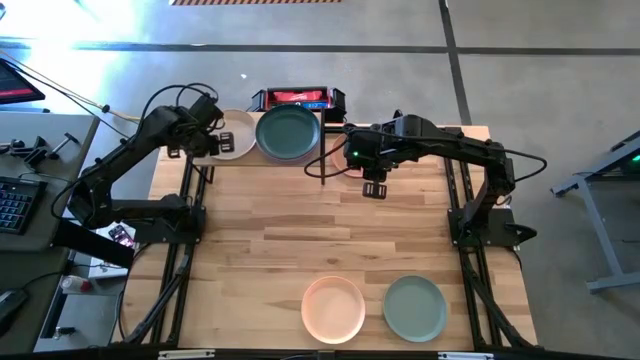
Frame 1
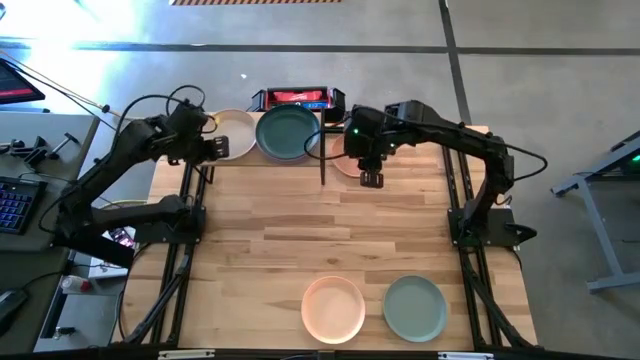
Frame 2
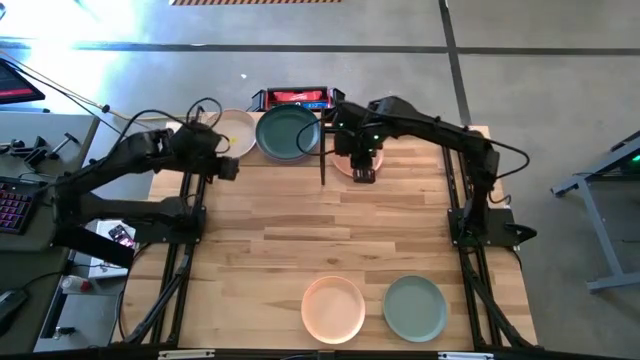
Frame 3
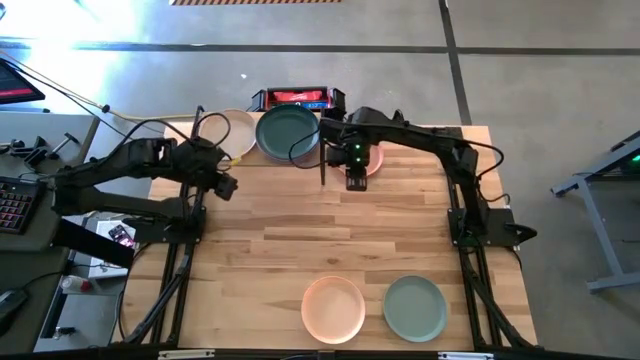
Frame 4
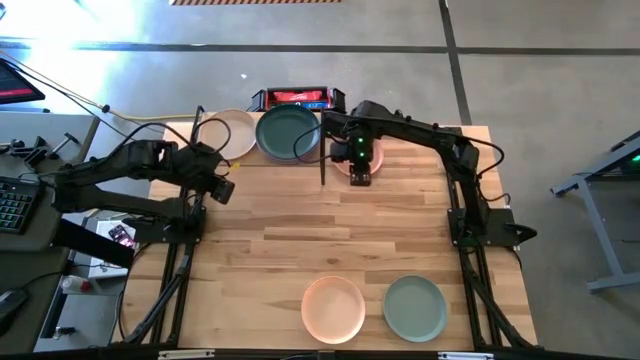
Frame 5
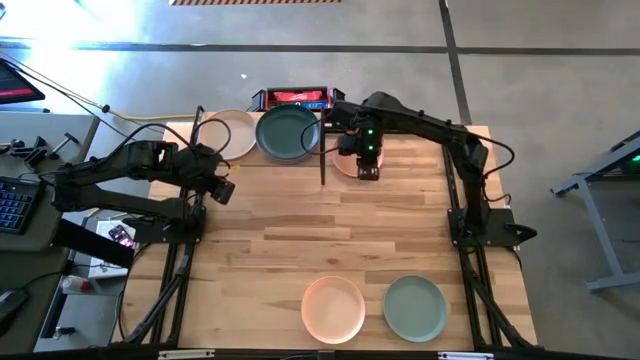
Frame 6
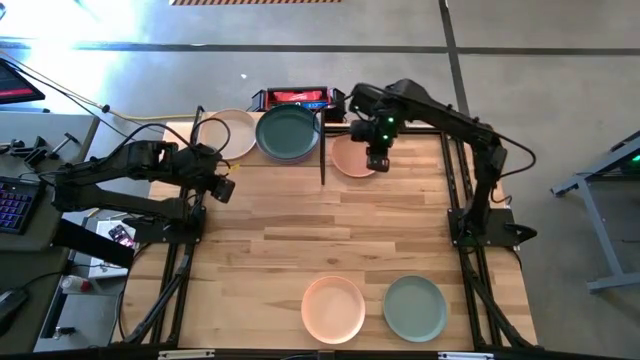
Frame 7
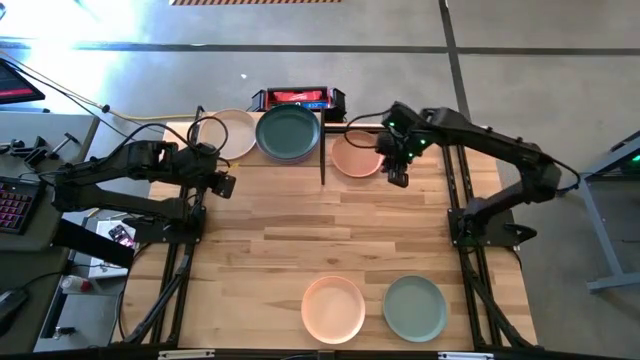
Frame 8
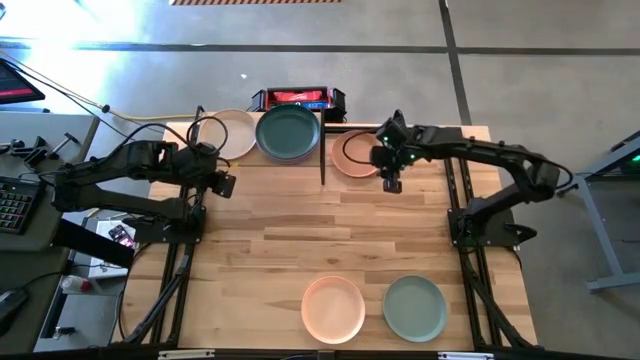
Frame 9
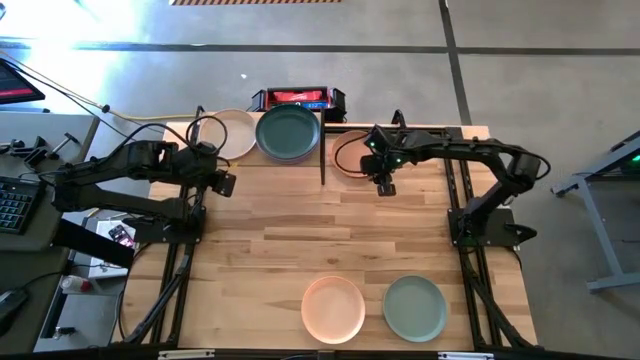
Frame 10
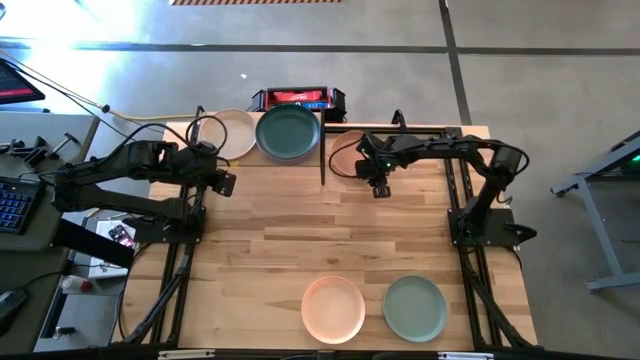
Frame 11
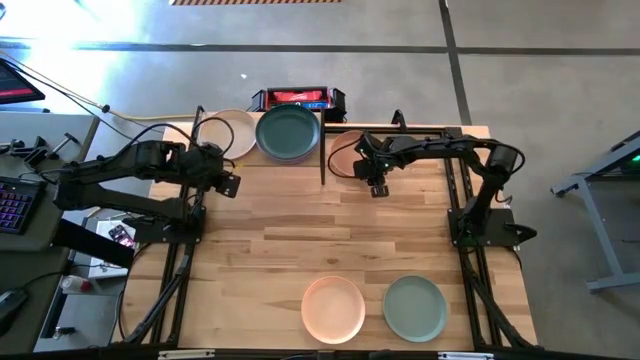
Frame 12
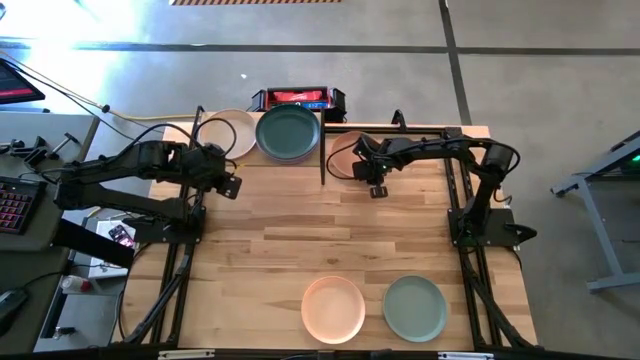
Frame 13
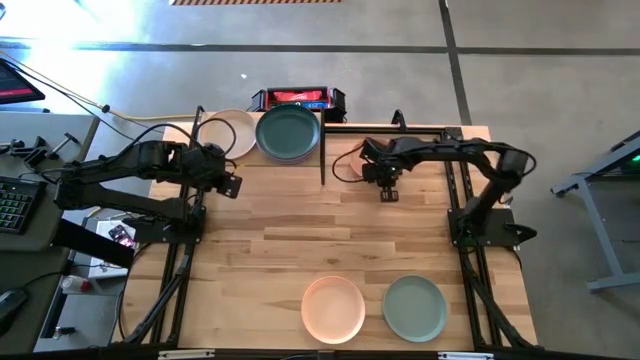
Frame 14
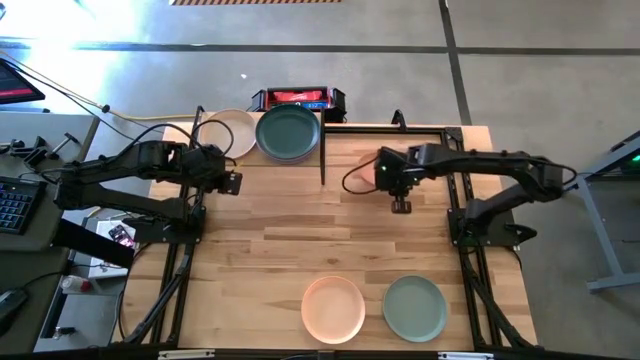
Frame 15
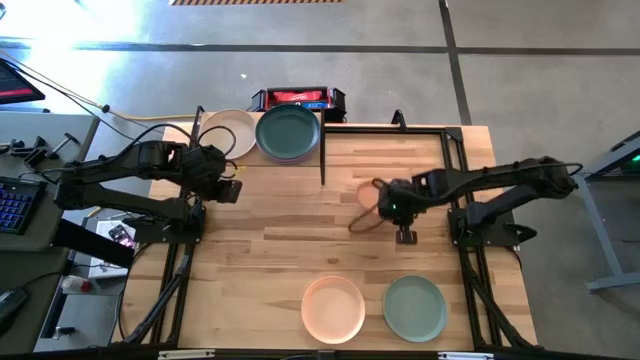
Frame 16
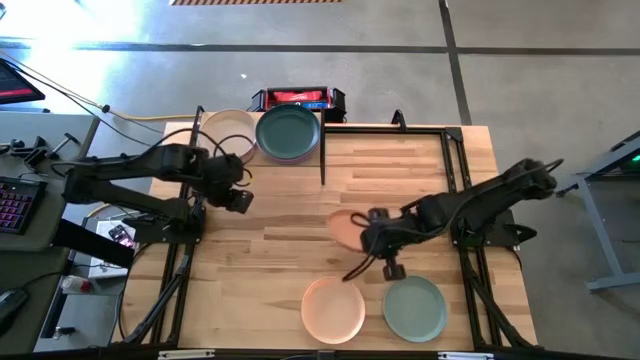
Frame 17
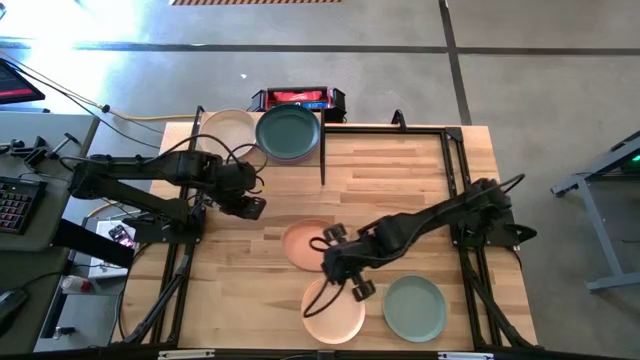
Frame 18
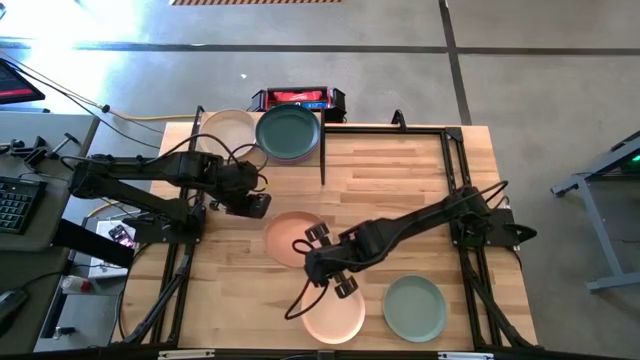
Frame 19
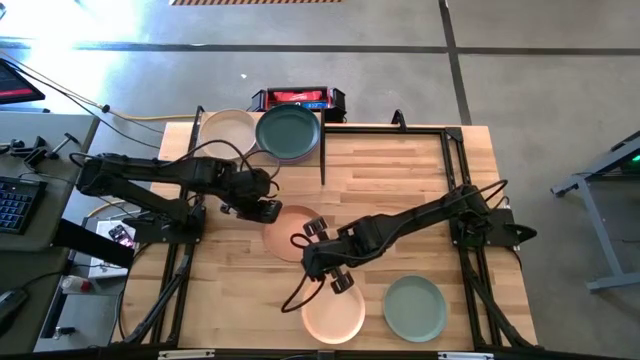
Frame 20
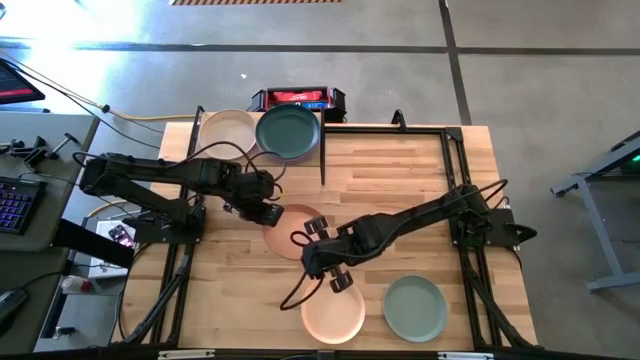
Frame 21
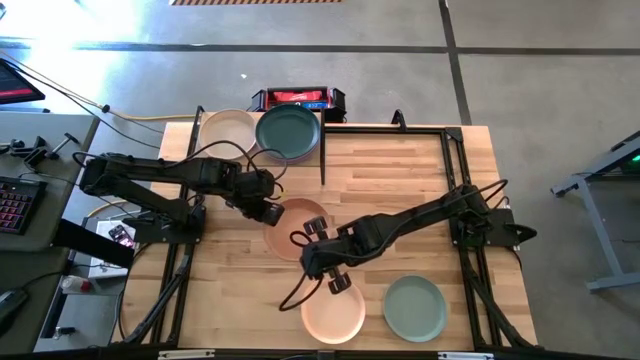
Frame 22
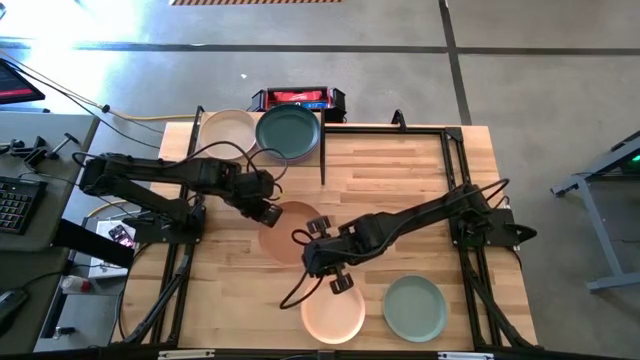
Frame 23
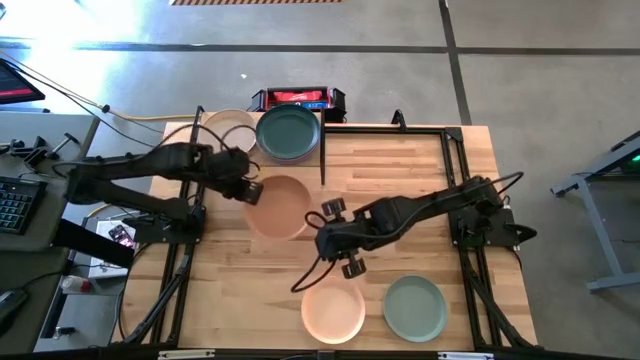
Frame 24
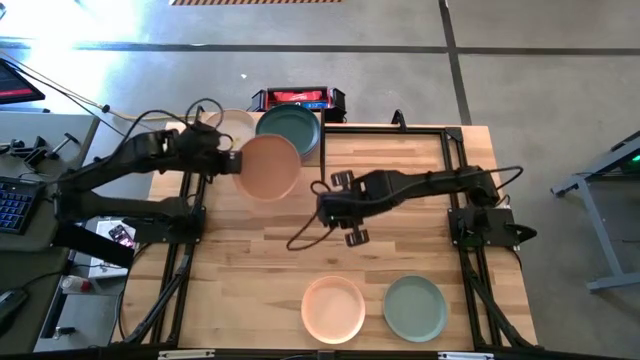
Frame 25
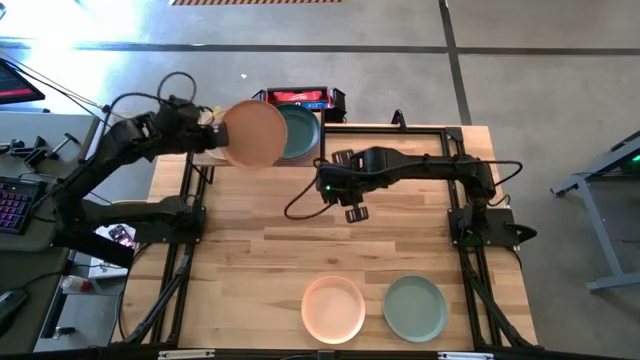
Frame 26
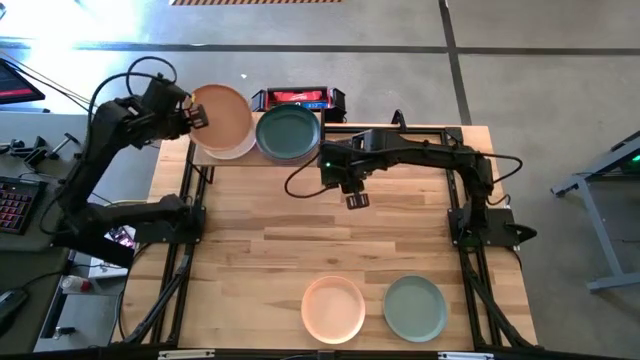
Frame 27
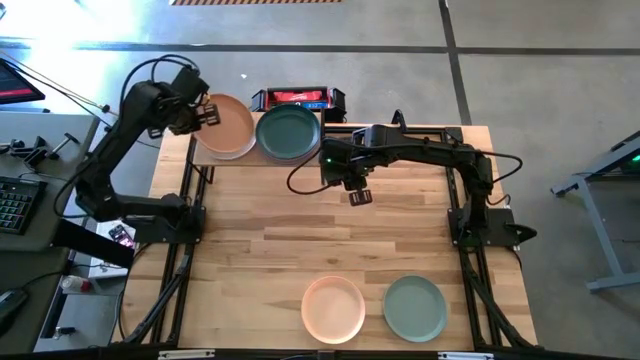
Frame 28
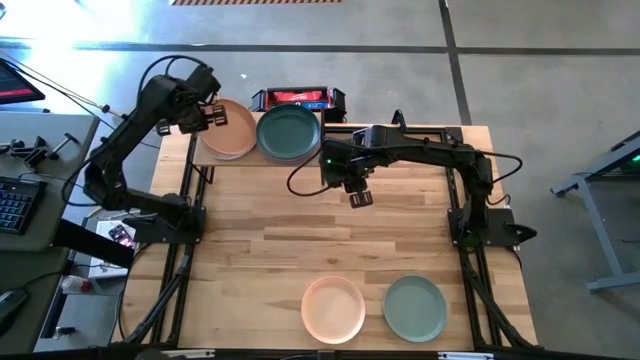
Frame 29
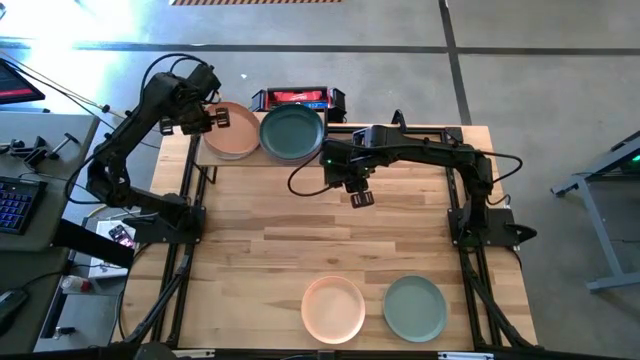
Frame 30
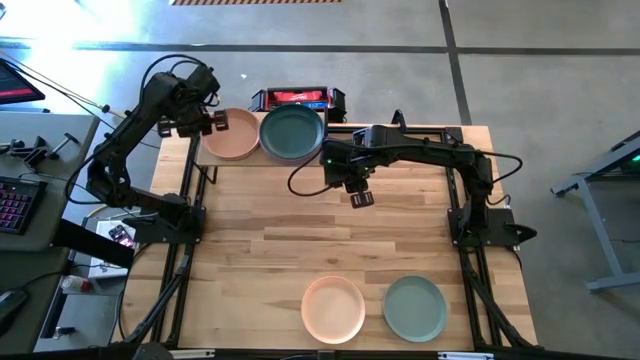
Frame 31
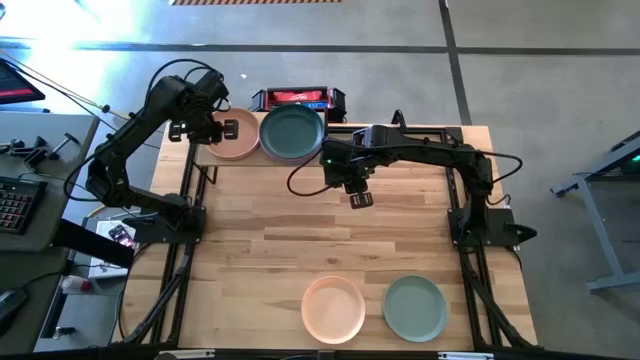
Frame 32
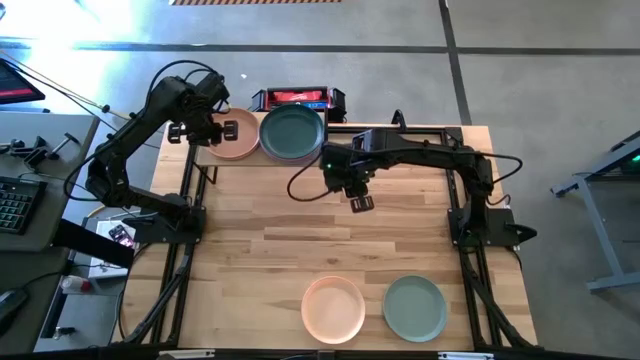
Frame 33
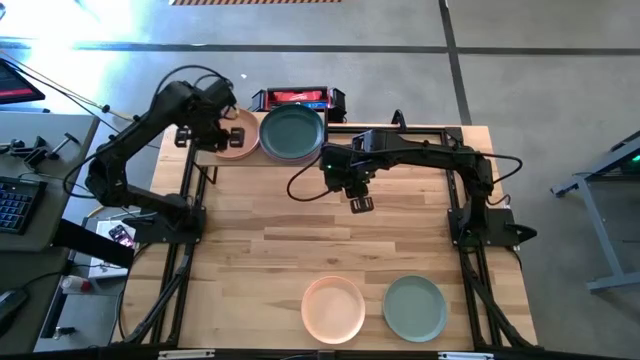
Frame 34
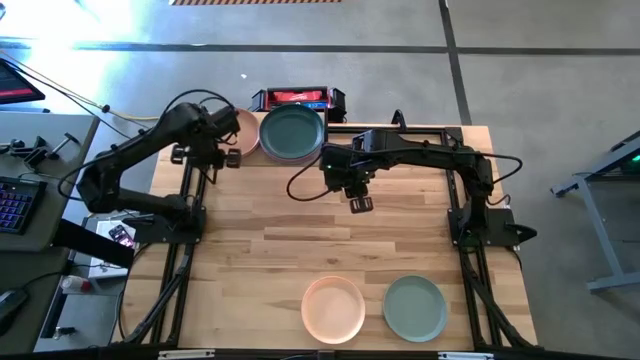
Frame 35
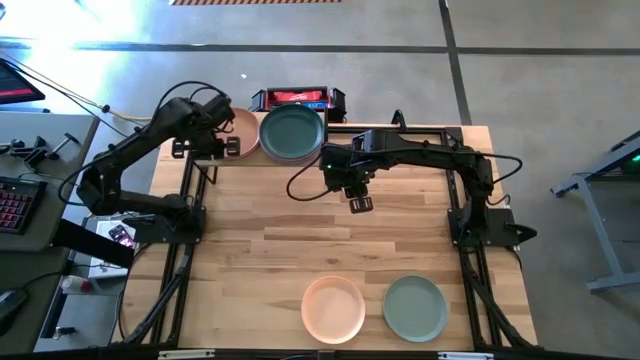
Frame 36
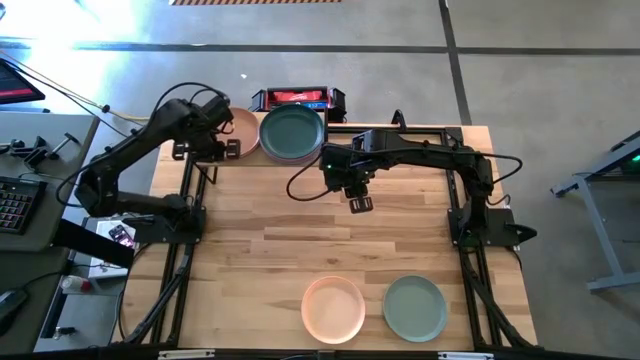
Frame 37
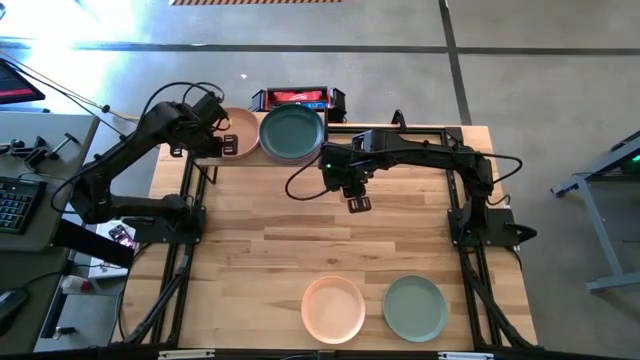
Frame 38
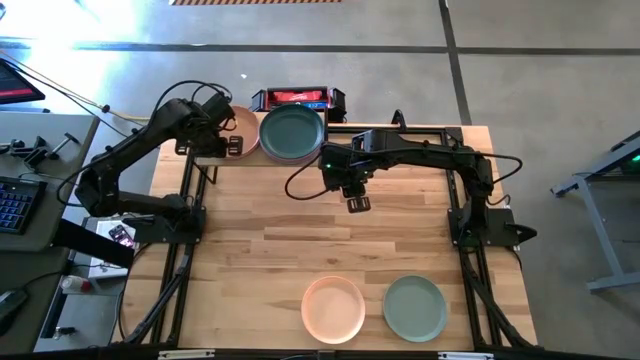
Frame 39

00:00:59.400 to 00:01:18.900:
Task: Place and stack plates onto a shelf
Stack the brown plate on top of the white plate on the shelf

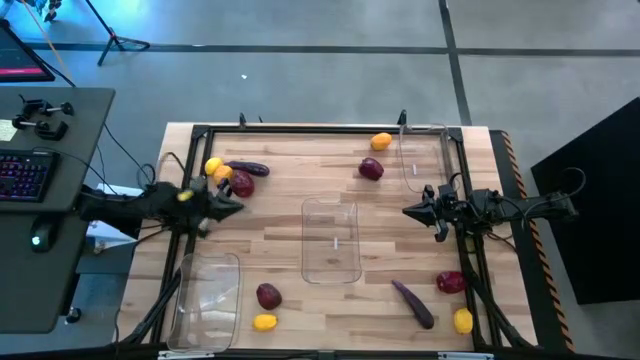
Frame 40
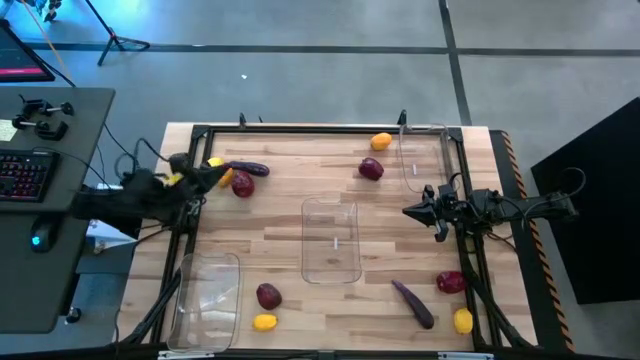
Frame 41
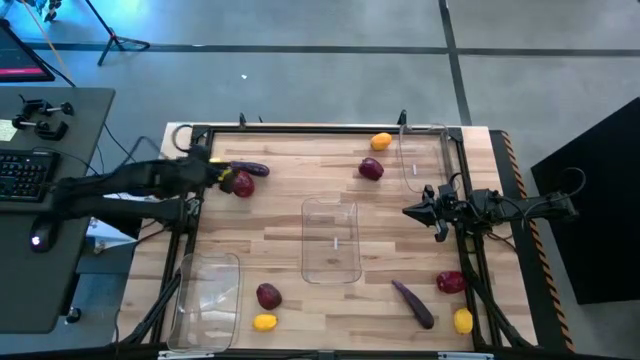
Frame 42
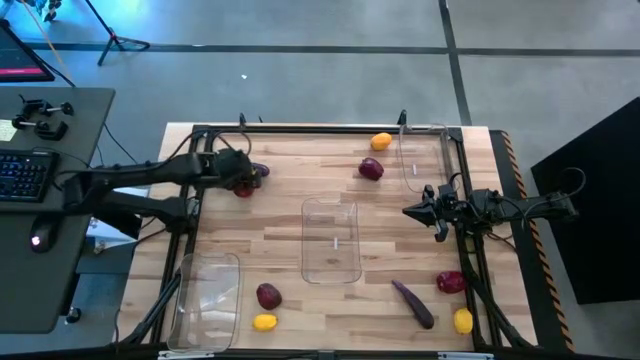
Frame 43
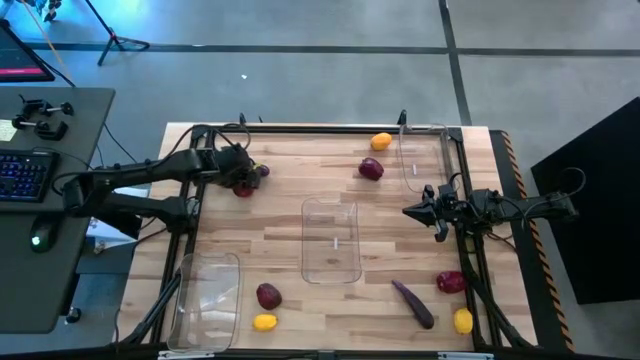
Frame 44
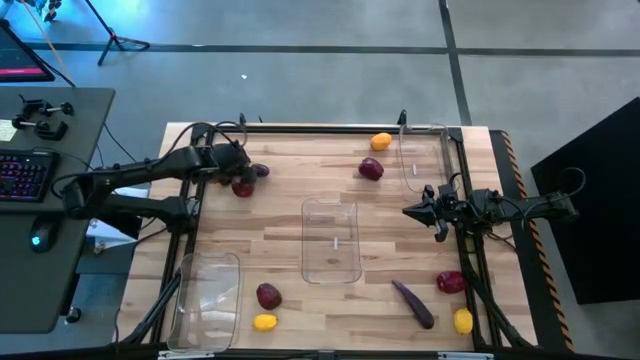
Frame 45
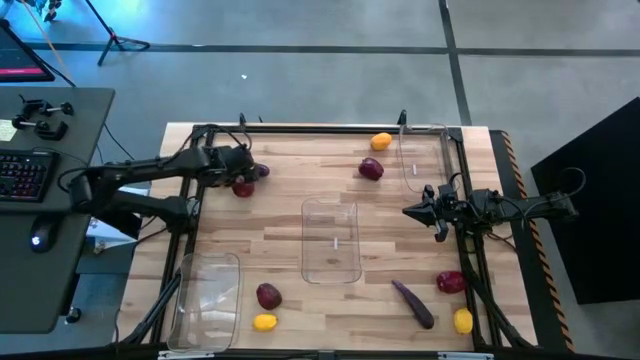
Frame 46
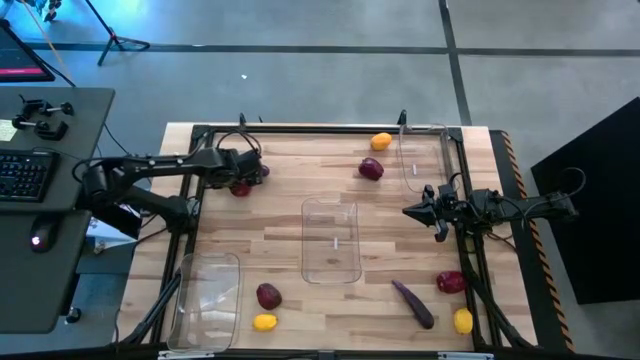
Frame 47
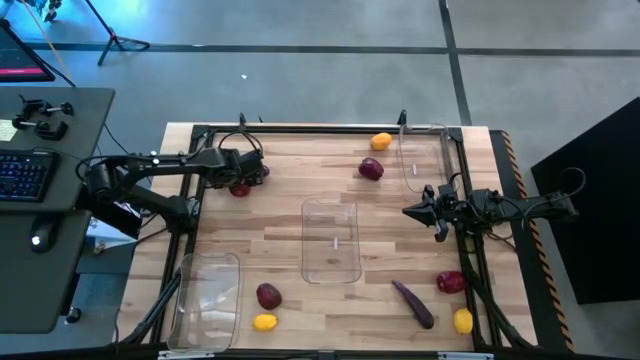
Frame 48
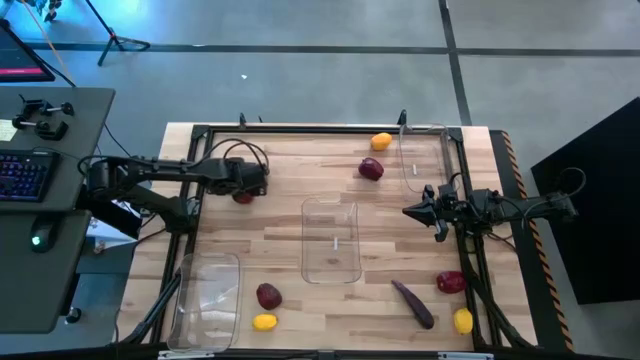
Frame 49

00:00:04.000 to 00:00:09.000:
Task: Sort produce into baskets
Put the red apple into the middle transparent bin
